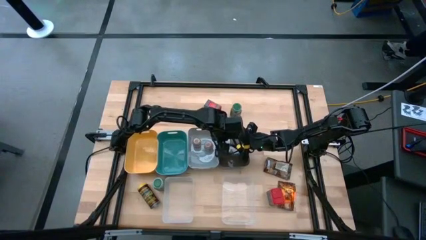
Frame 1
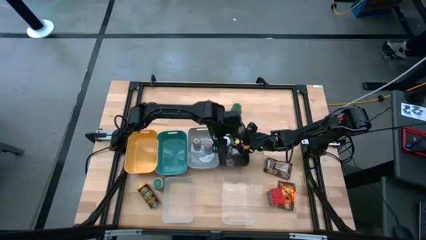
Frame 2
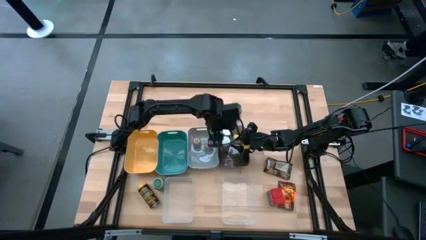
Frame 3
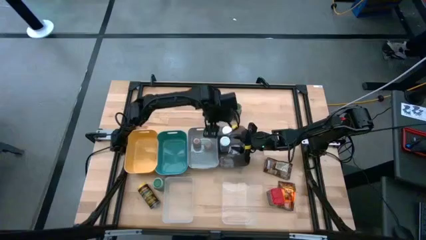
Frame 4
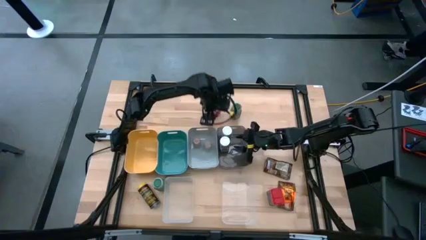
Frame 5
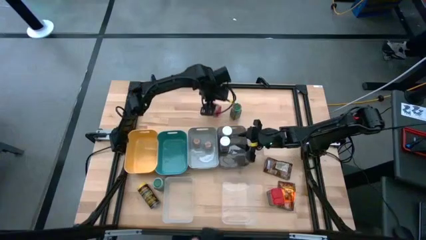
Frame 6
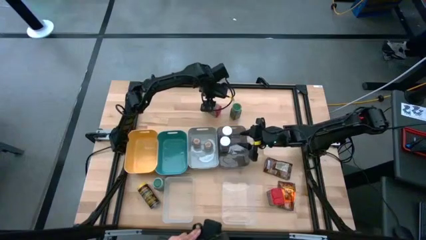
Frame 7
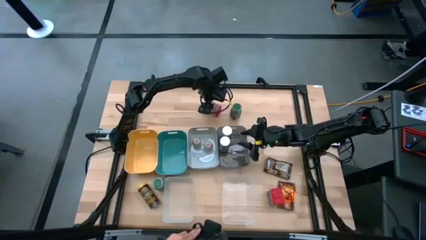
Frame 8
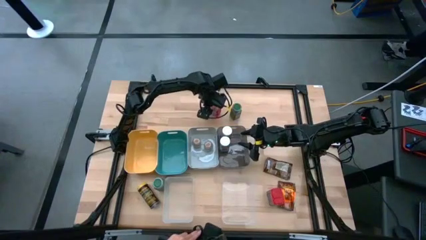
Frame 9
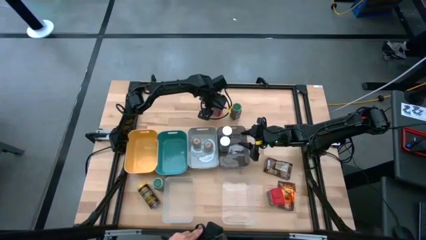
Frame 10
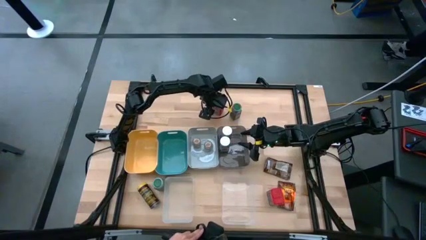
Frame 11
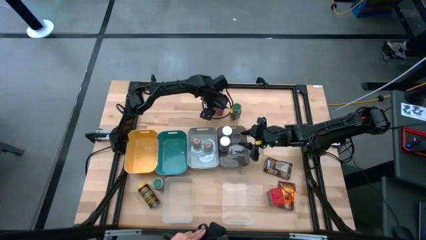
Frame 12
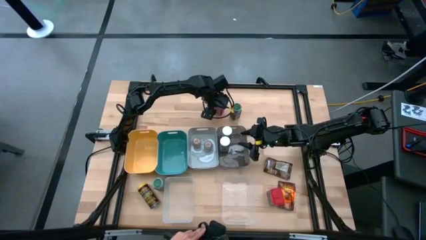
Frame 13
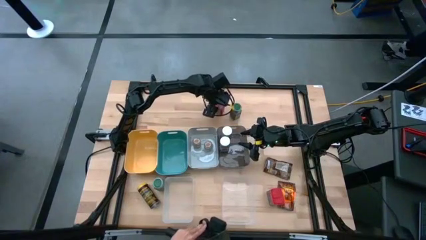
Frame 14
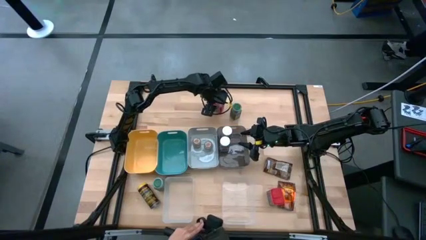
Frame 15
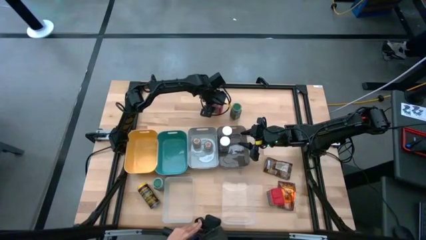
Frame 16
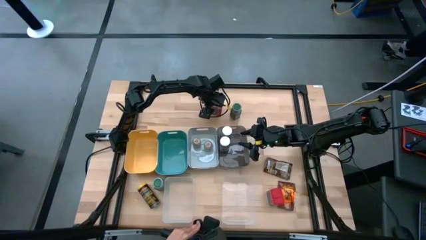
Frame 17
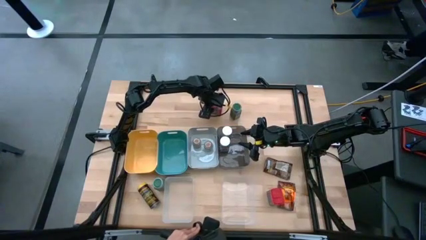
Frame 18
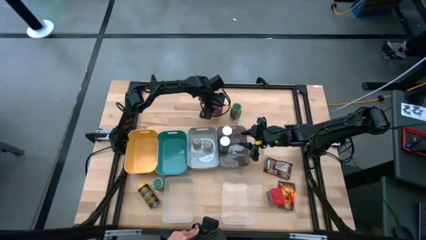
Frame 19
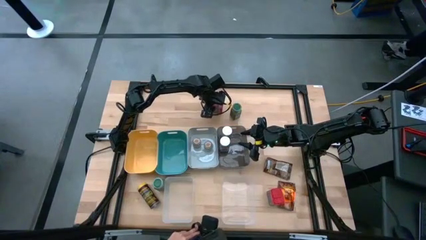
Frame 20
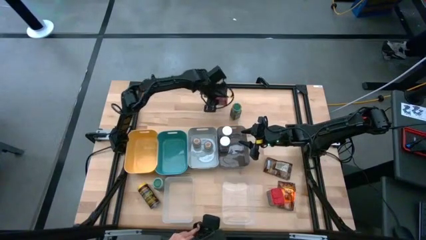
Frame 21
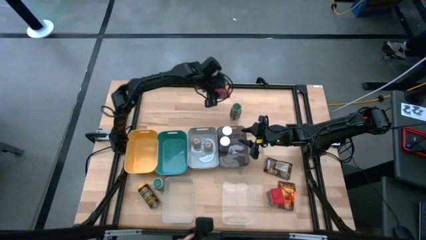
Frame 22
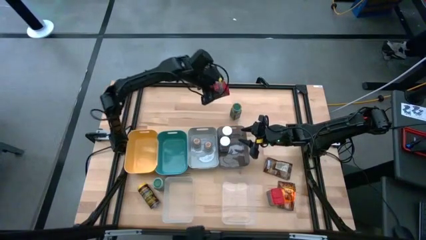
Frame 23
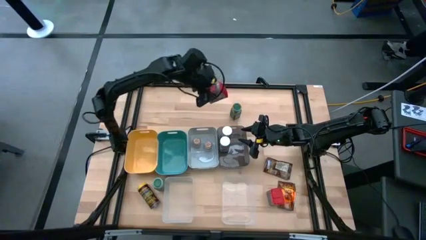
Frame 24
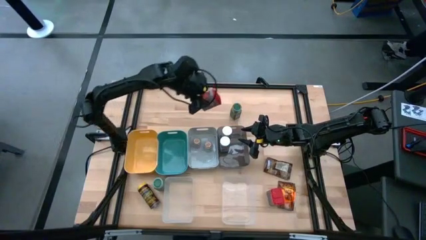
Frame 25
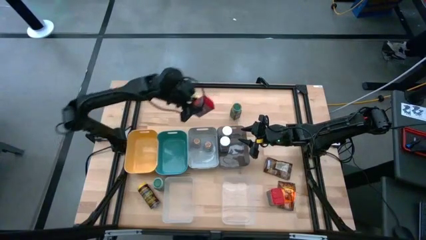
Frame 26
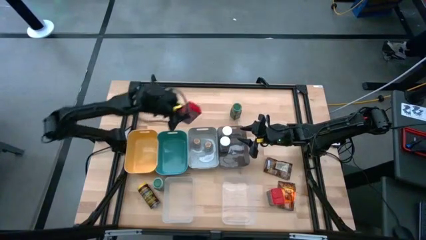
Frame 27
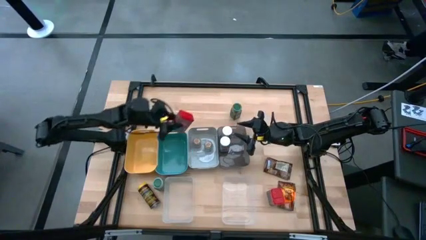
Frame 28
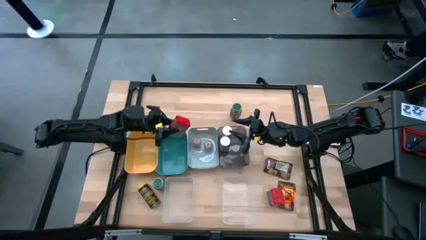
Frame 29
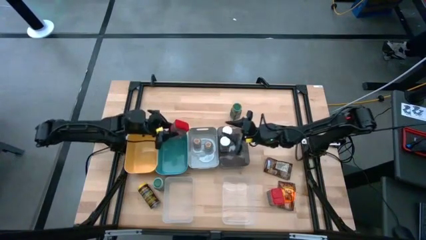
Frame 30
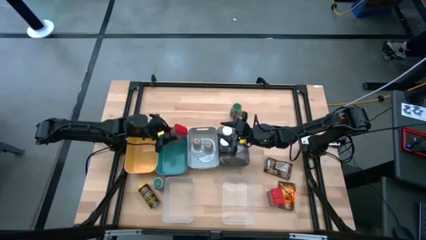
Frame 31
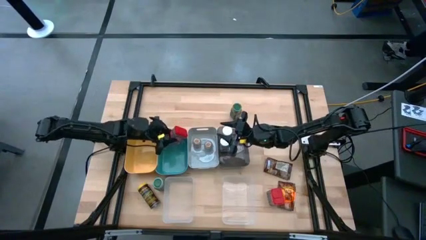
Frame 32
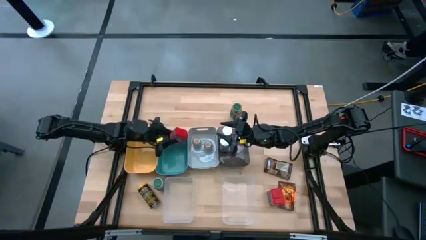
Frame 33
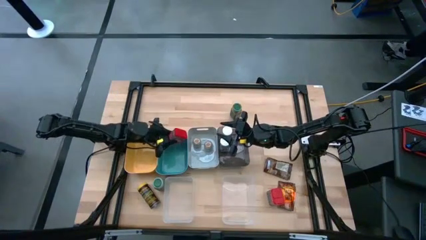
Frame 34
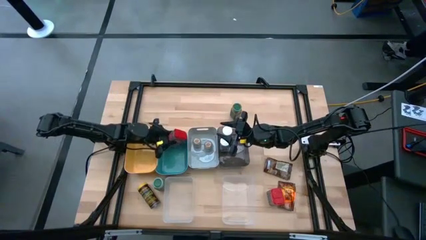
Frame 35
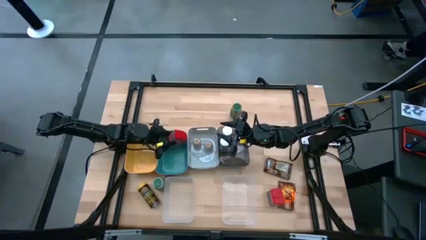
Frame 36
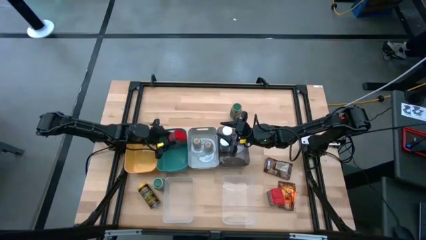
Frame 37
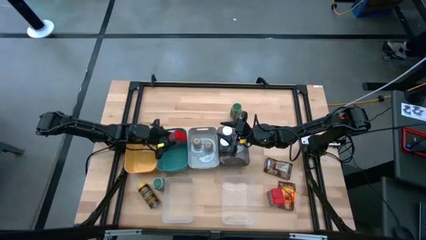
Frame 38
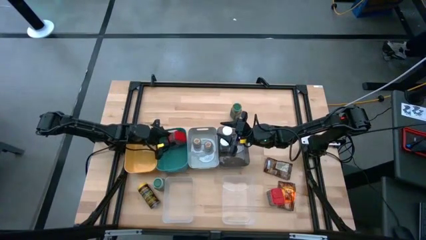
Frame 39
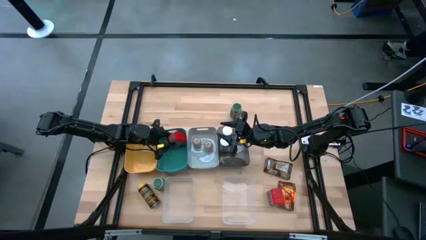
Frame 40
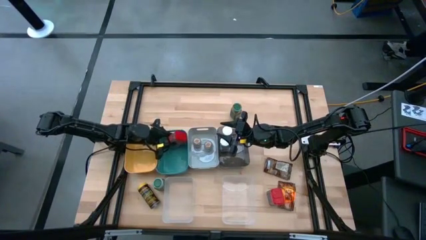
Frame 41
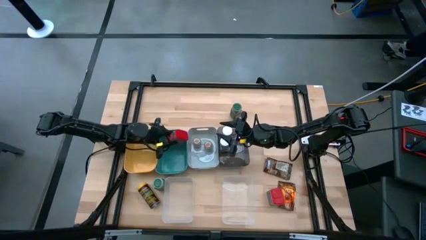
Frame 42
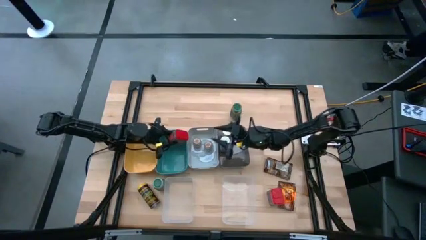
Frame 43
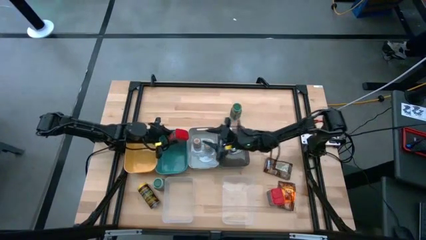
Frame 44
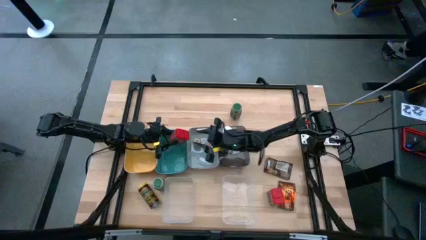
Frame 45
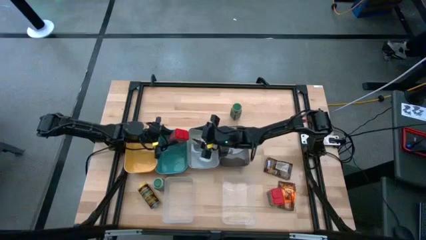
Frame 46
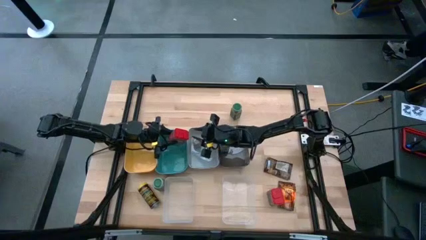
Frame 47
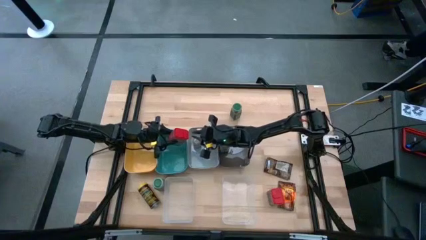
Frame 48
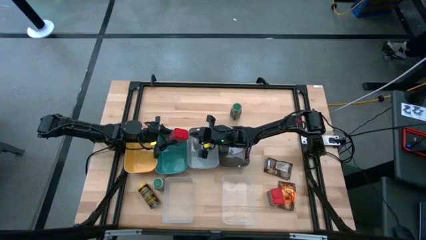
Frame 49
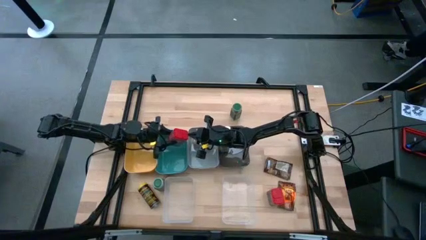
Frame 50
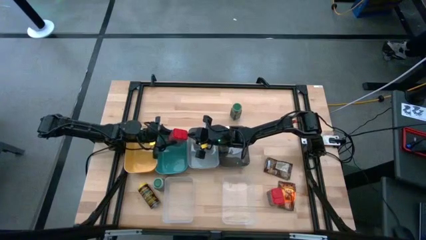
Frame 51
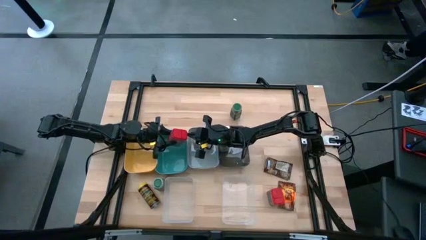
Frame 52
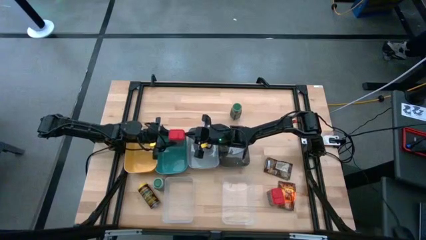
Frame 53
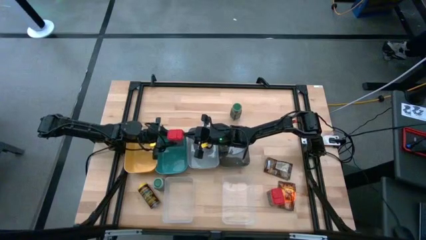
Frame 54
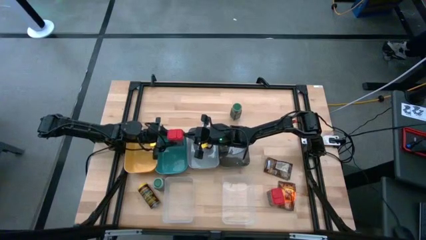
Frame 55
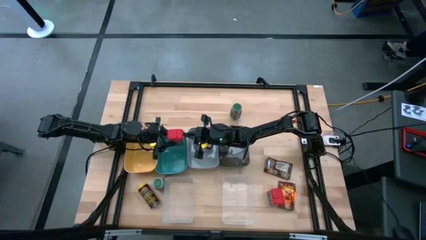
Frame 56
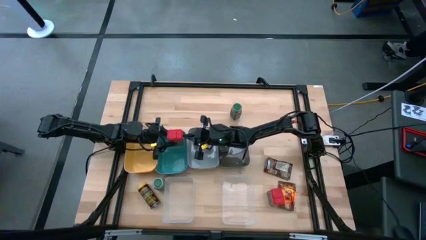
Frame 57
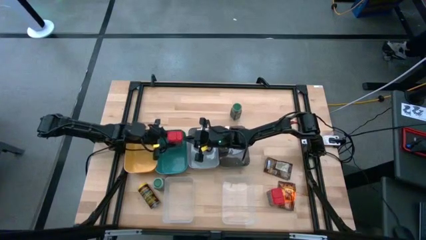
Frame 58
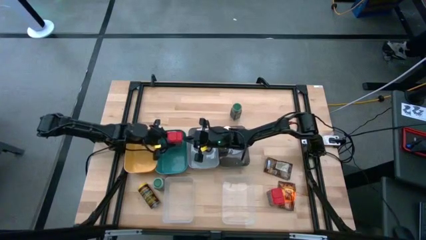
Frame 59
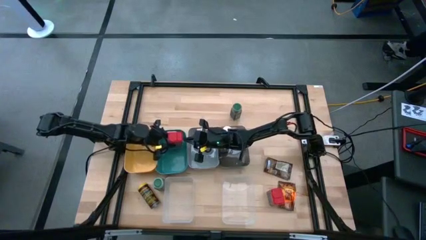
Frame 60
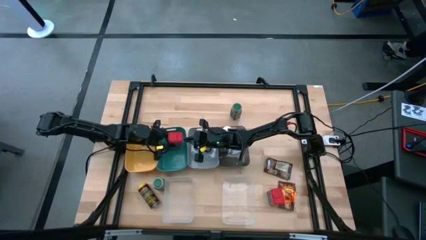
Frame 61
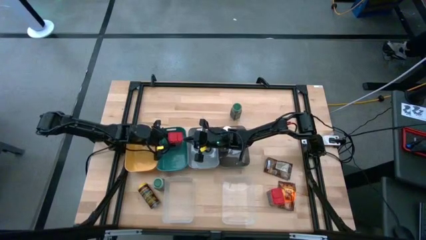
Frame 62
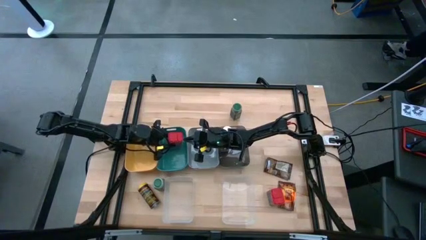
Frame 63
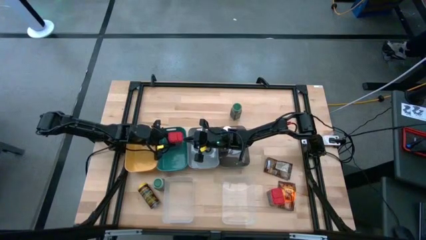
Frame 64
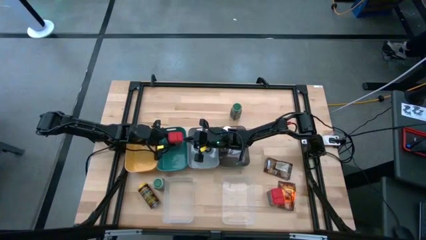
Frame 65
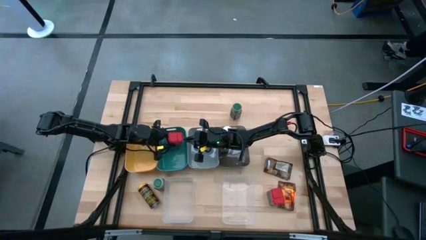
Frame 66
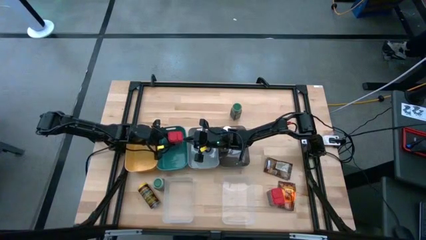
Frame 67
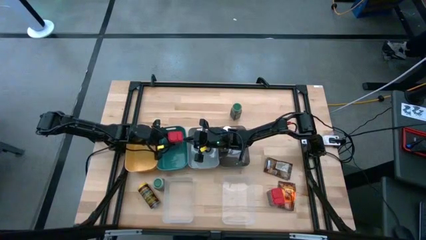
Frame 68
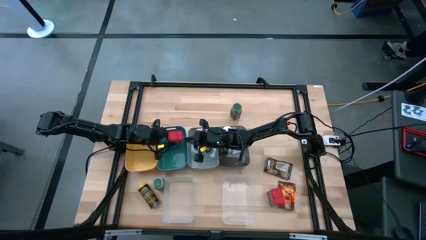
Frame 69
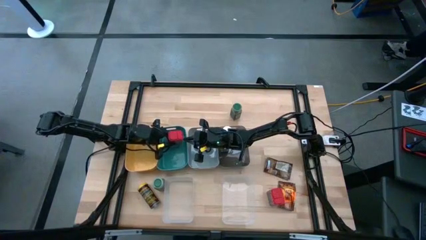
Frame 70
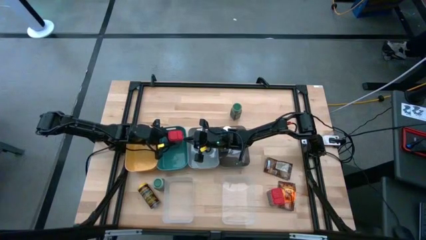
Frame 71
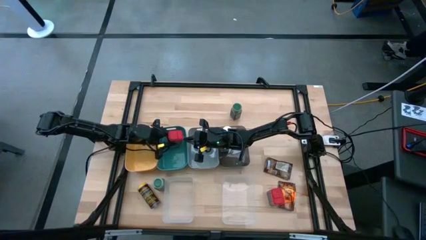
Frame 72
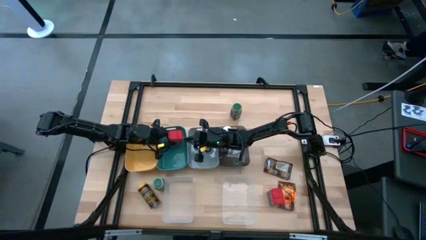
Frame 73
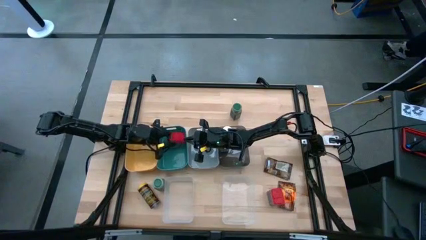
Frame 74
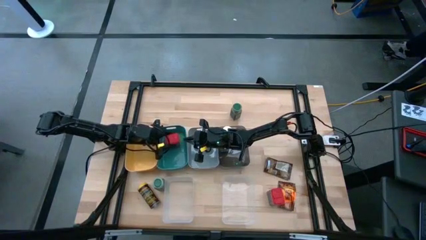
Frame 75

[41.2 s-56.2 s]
Task: Sort spices by type
Put the top red seasoning can into the green bin

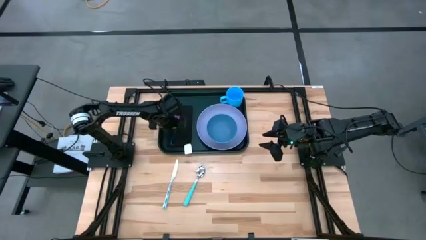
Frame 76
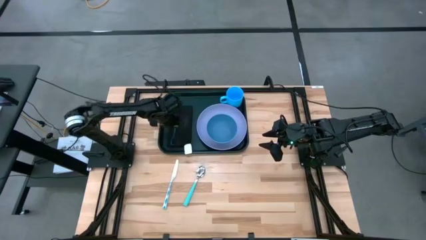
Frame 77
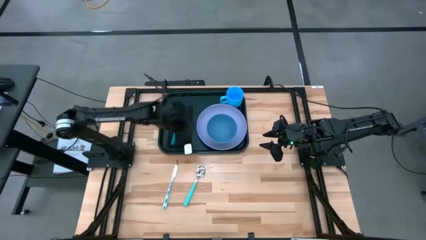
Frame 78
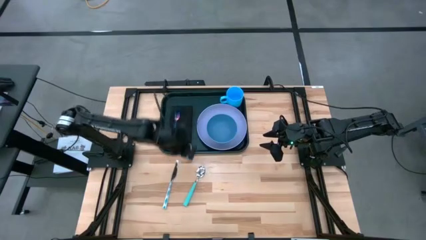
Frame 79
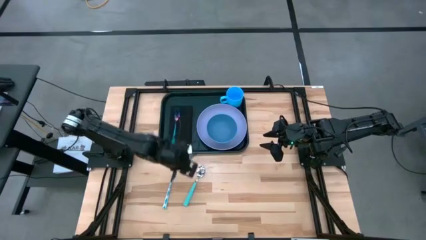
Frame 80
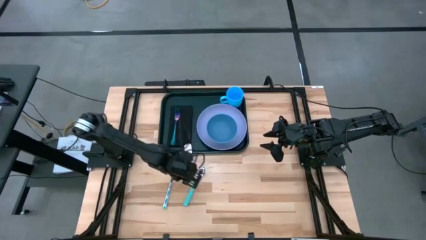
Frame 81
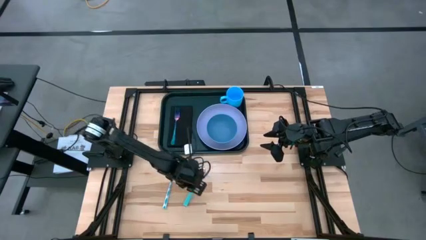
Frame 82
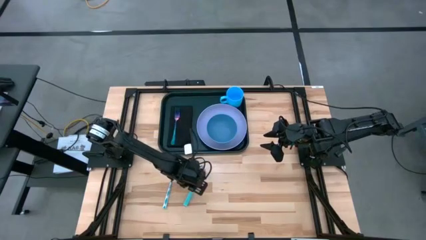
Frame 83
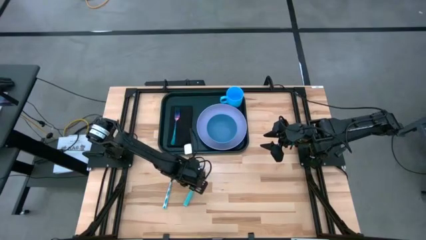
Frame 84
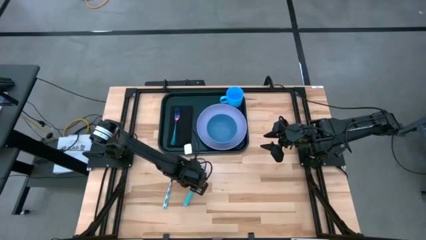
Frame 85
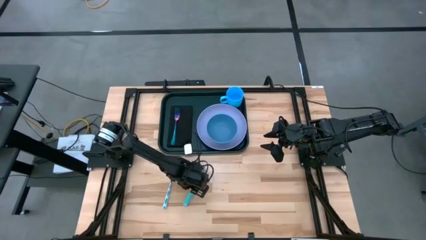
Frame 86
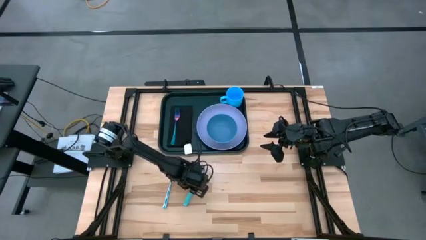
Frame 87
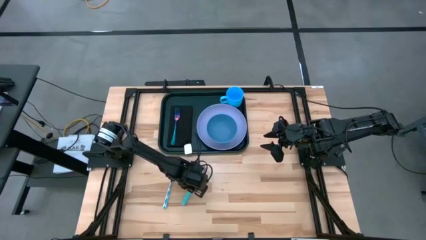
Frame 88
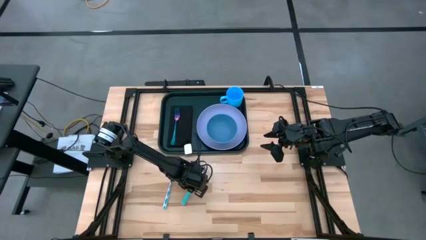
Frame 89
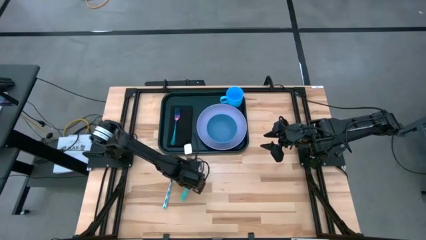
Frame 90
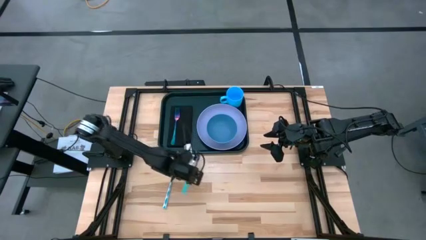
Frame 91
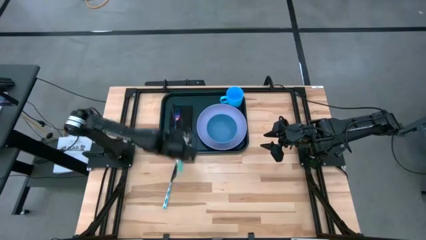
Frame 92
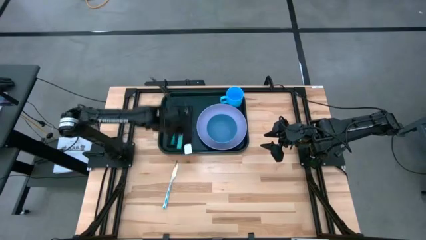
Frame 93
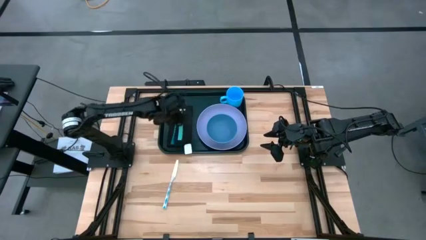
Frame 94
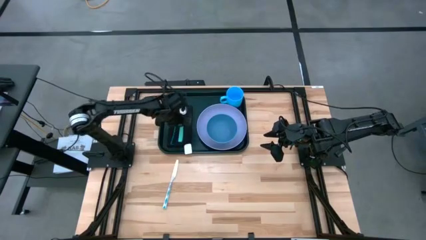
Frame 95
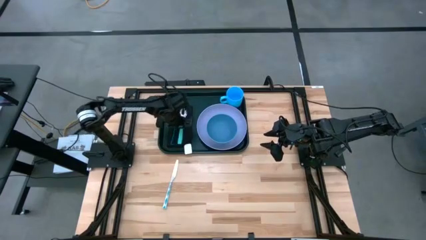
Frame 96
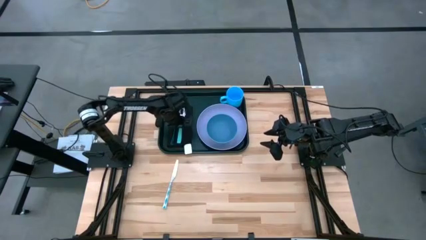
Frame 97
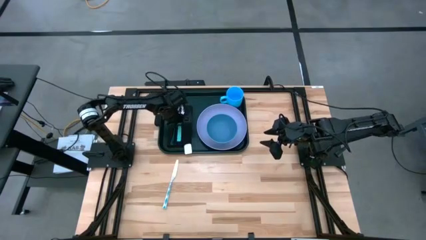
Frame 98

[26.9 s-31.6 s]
Task: Set up tray
Put the blue spoon on top of the black napkin to the right of the blue fork
